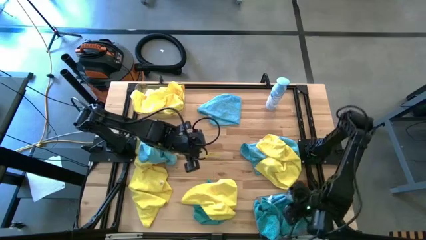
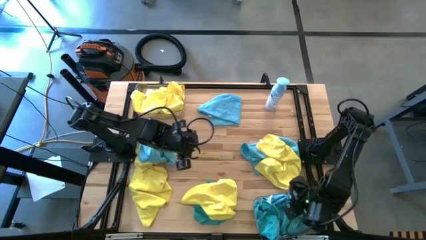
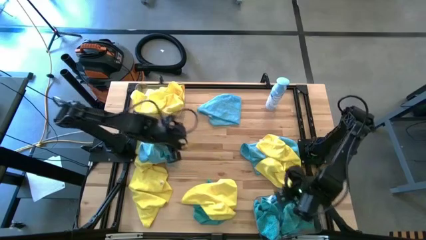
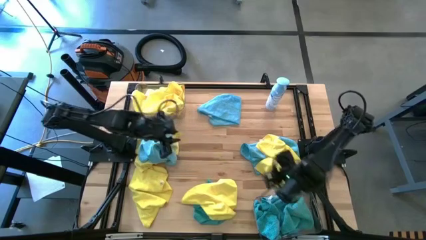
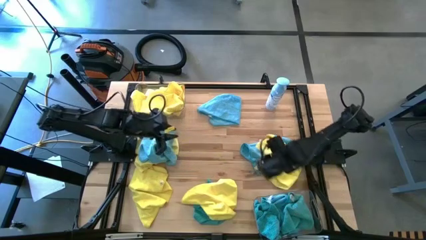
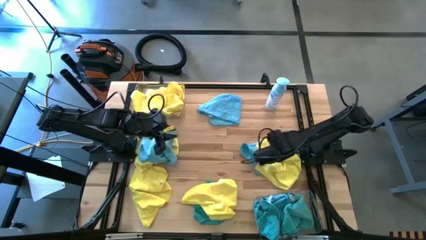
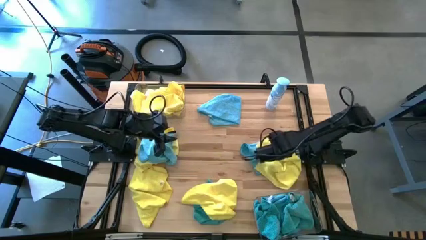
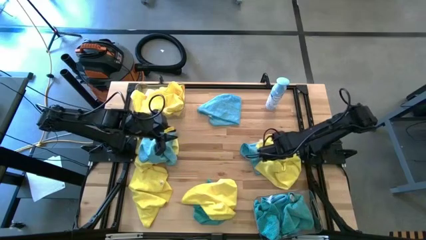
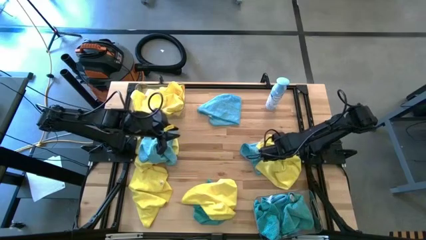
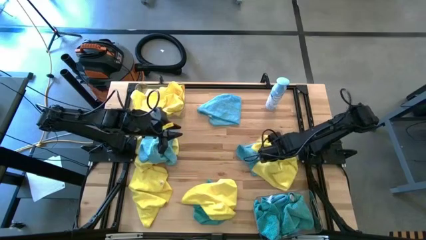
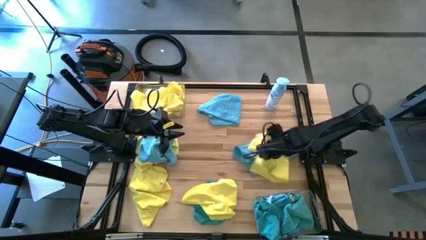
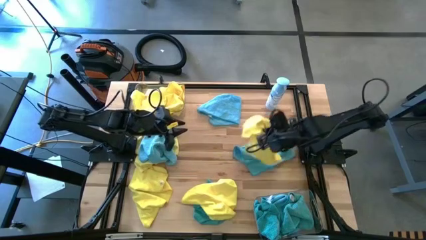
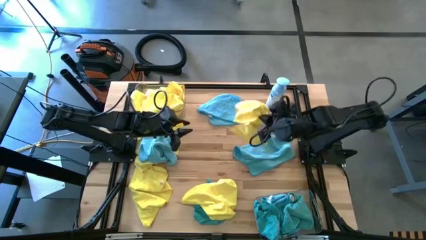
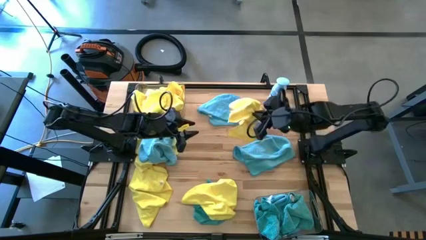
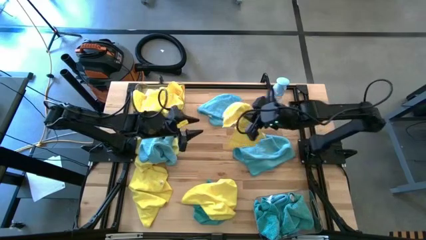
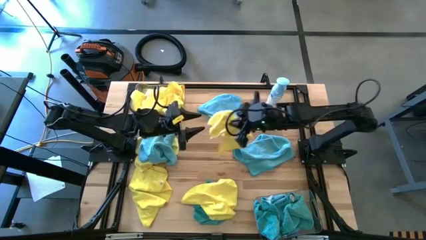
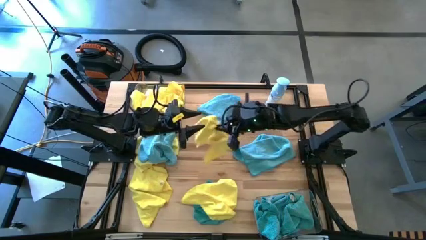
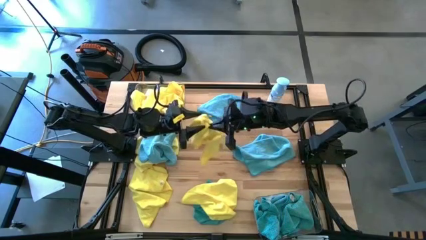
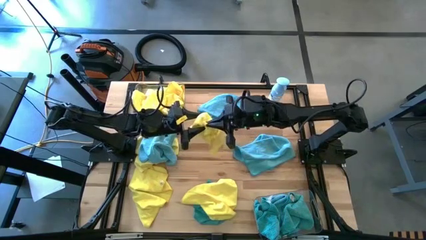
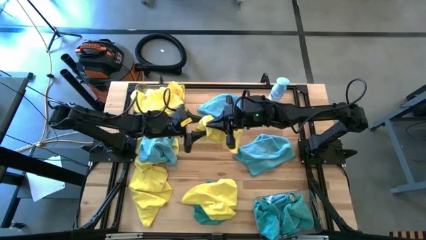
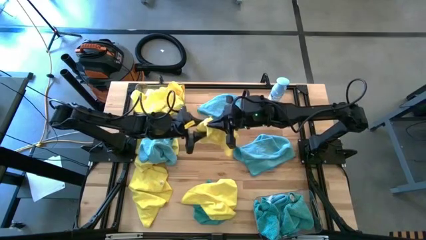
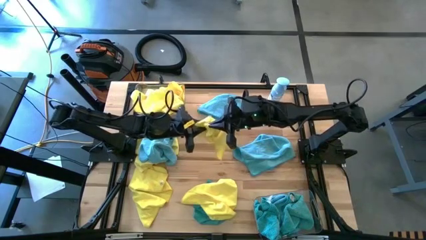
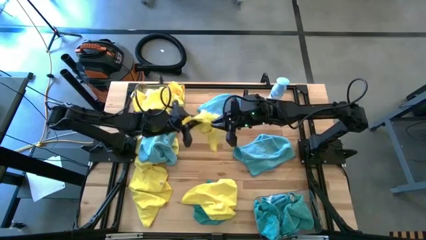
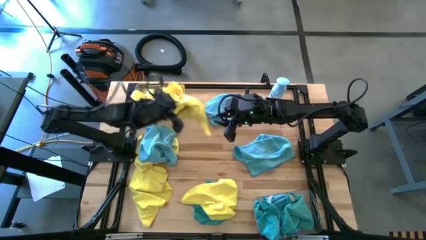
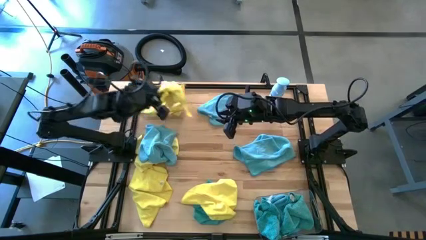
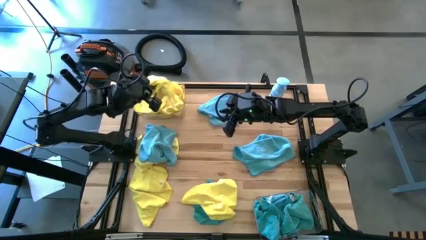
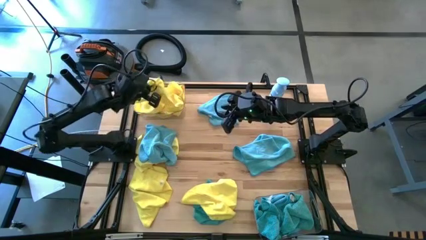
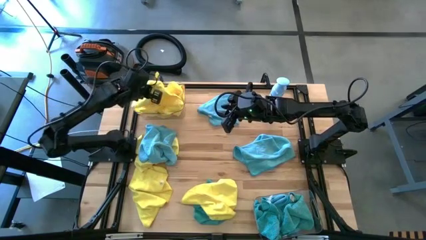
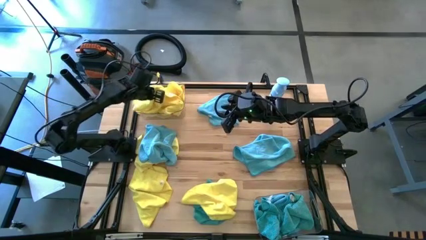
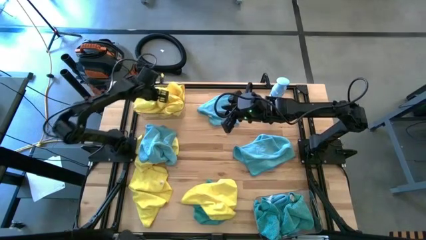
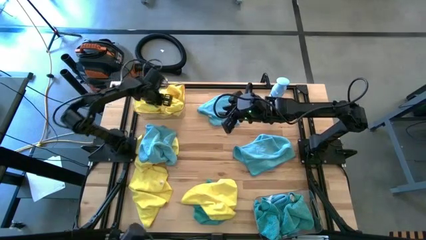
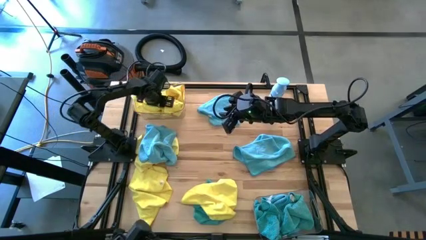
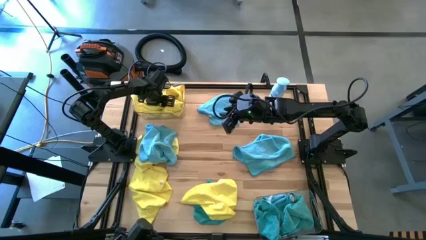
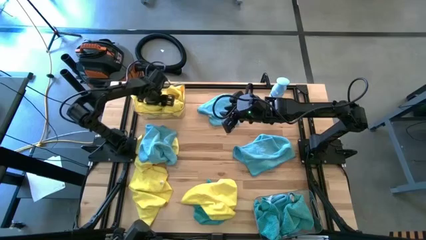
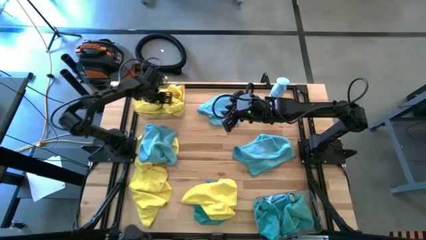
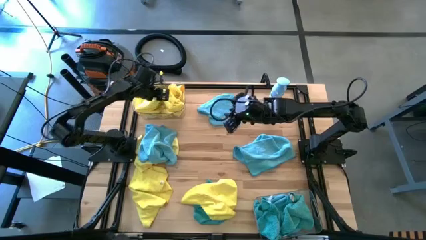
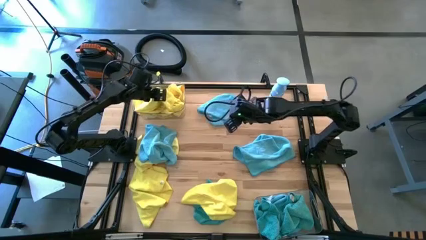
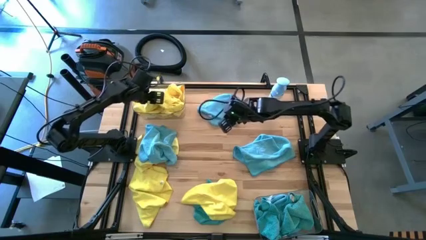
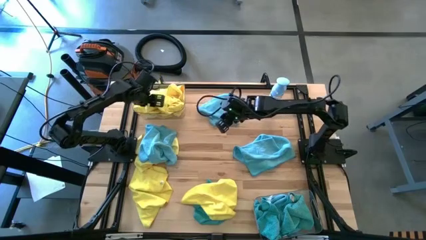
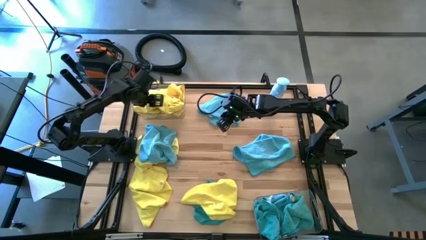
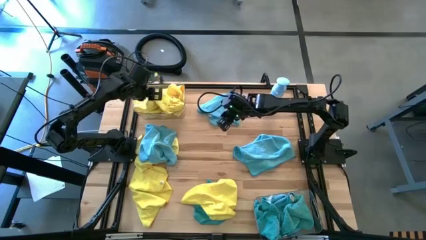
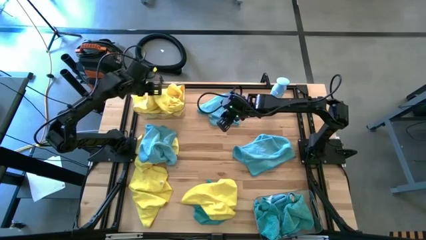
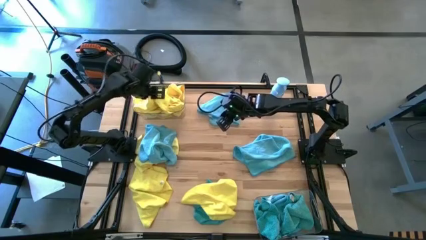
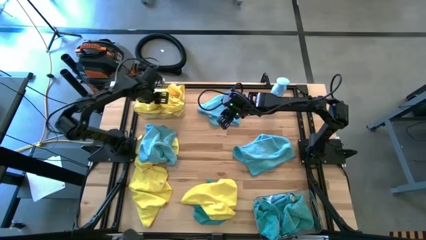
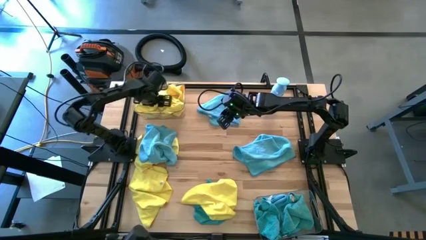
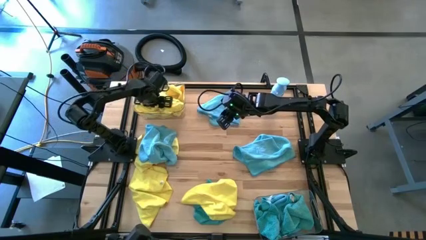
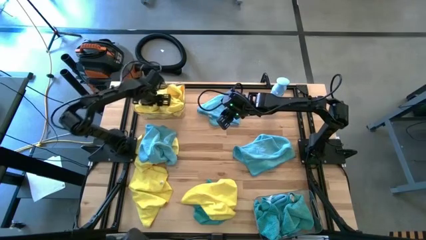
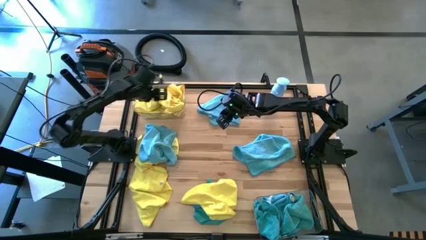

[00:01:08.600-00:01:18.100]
Task: Sort microfiber towel by color & place in baskets
Put the yellow towel into the top transparent bin

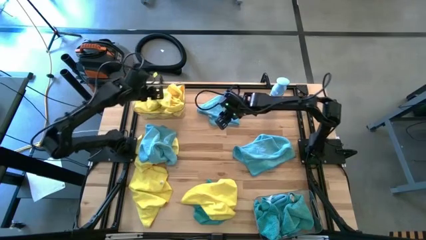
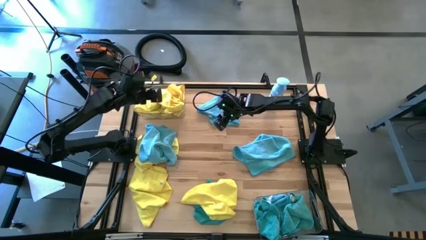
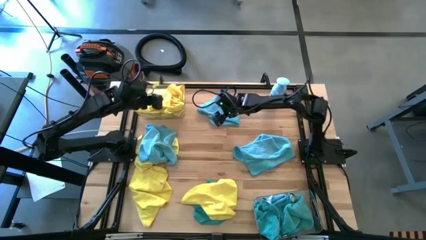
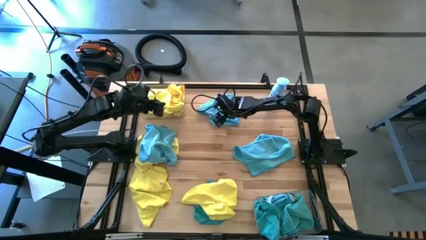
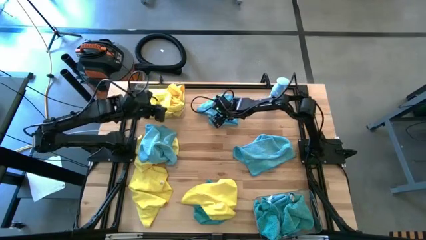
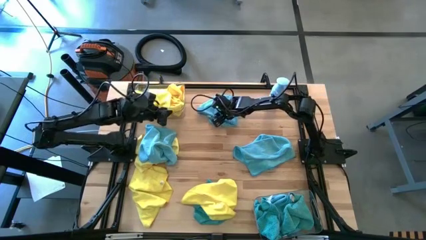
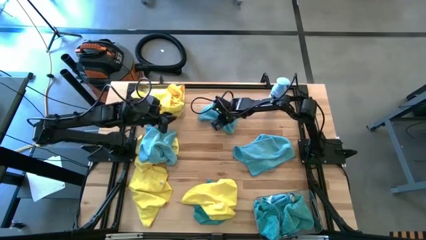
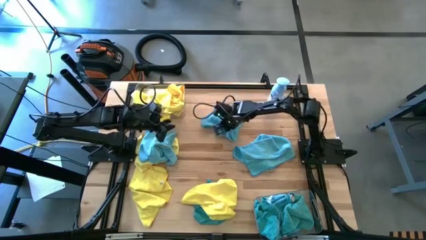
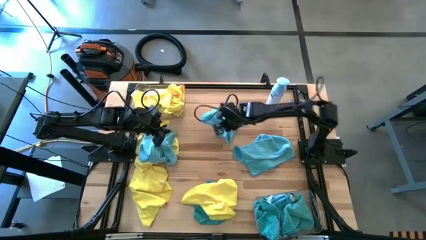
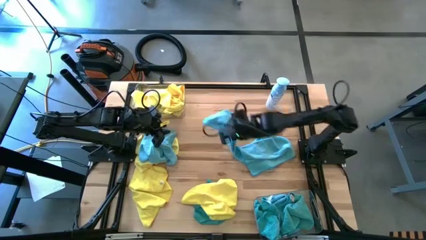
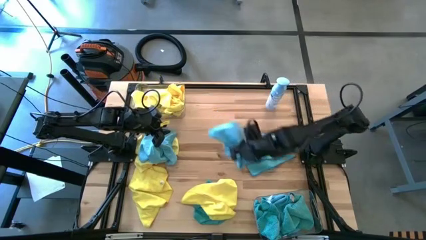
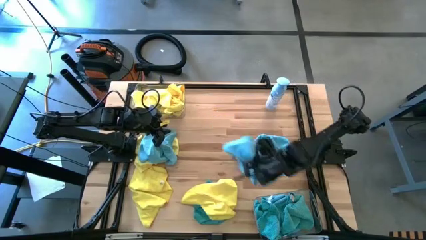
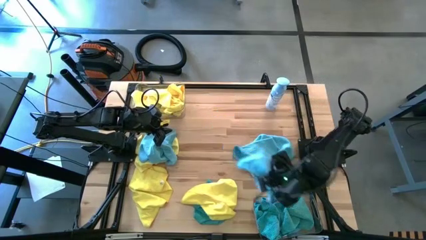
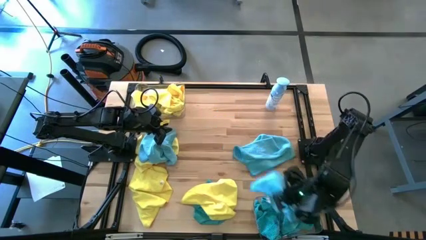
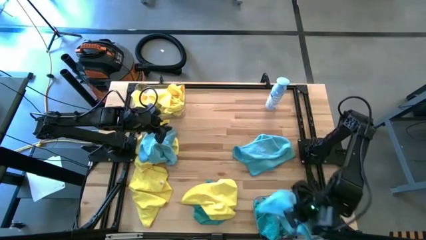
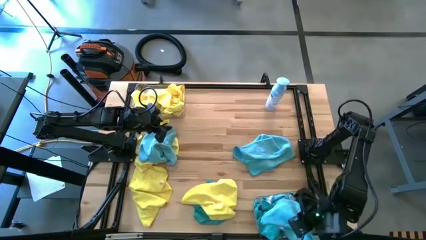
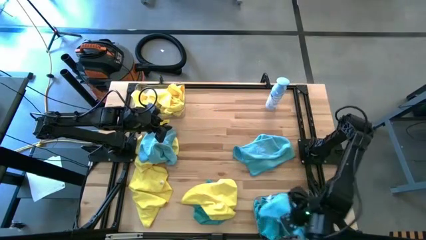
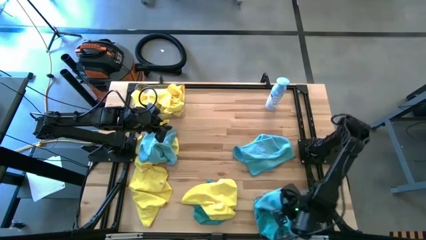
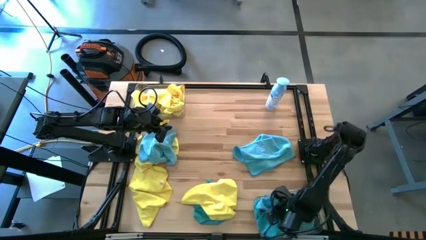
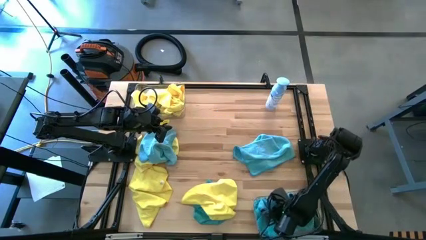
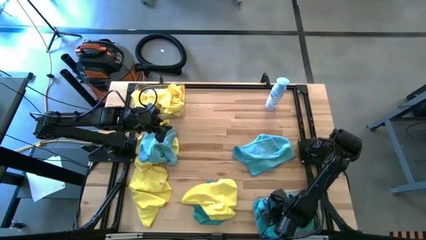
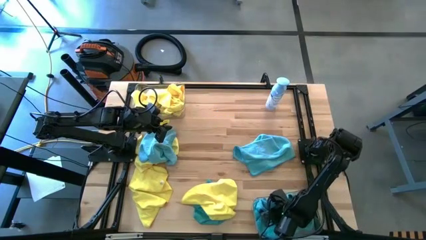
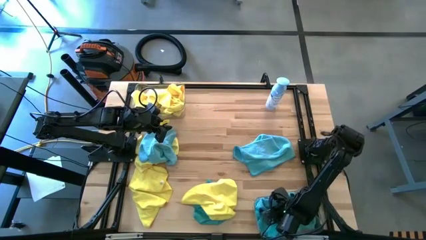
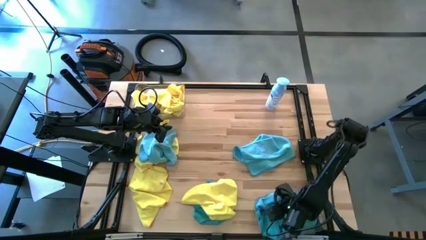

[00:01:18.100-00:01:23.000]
Put the blue towel into the bottom transparent bin

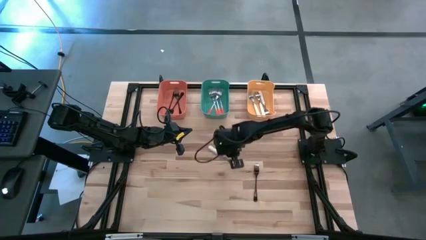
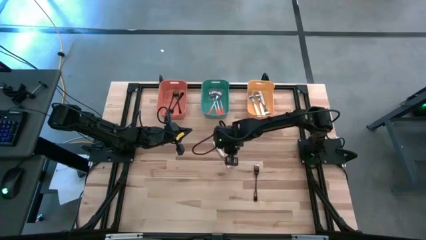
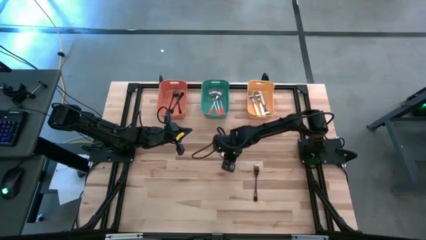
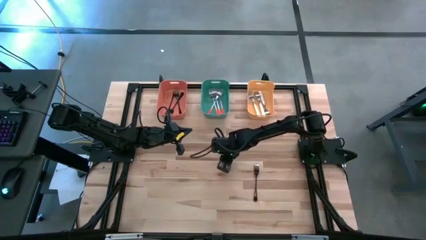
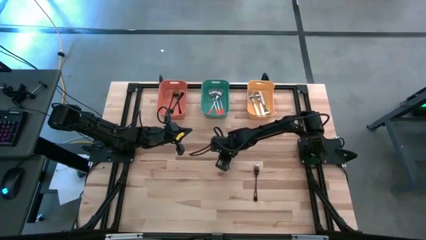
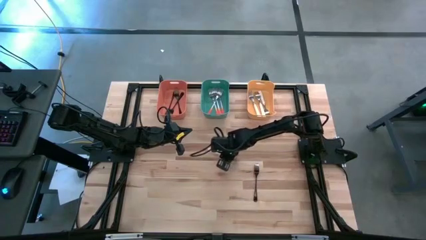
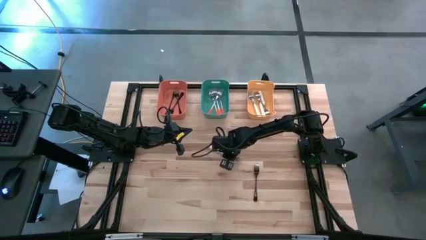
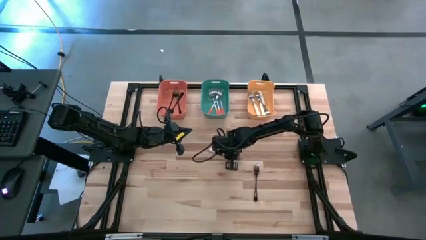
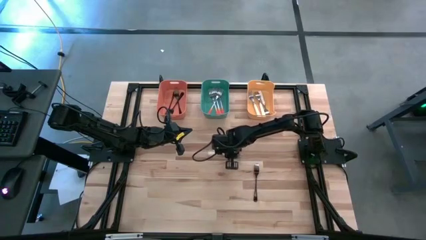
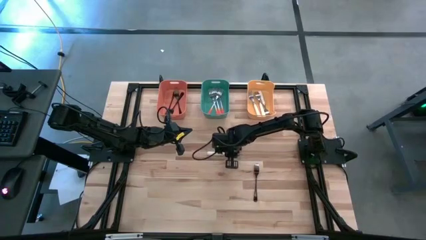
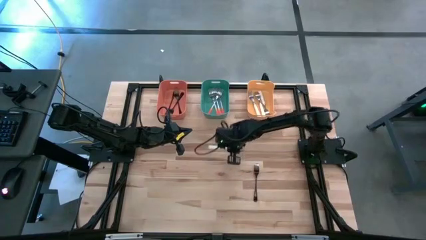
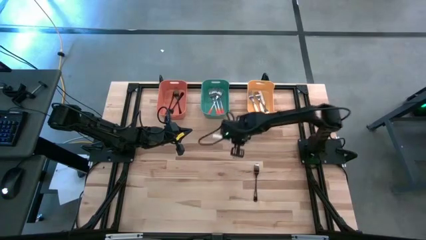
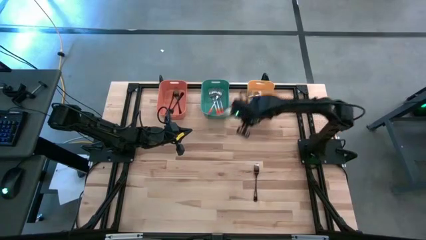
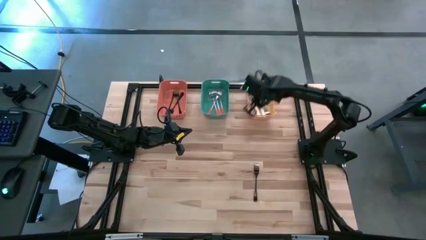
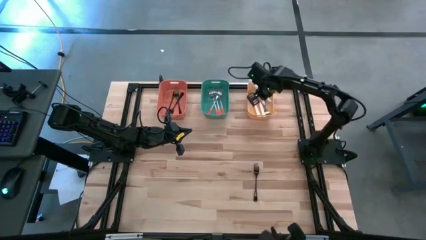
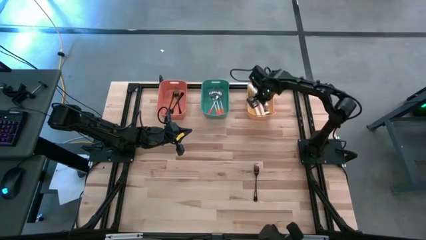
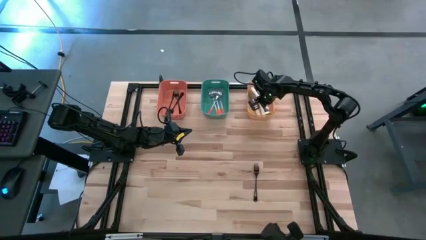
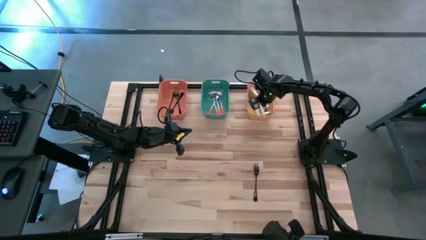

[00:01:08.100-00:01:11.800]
Task: Sort silverware by color (type)
Put the white fork into the yellow bin
